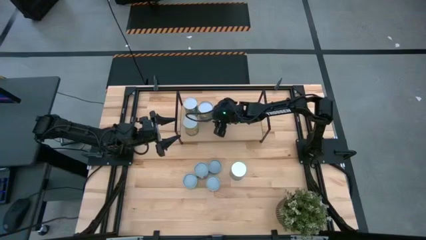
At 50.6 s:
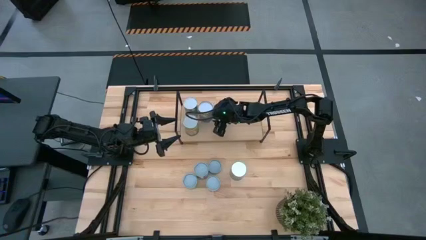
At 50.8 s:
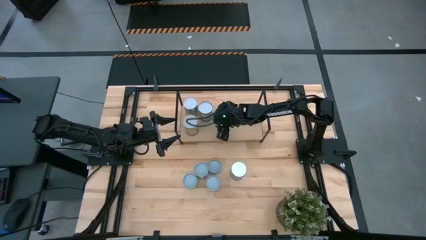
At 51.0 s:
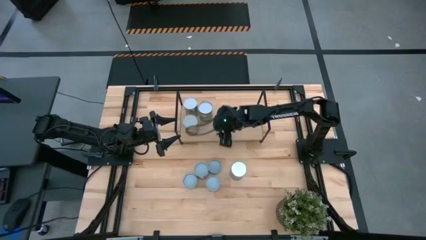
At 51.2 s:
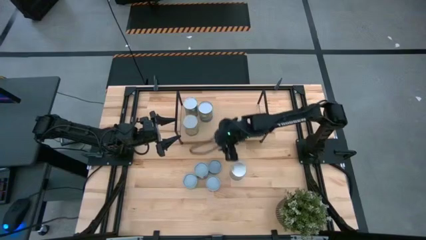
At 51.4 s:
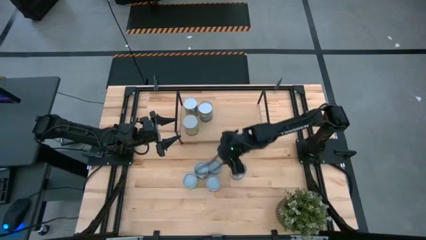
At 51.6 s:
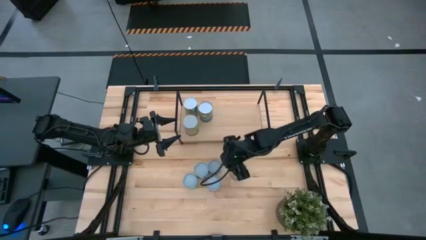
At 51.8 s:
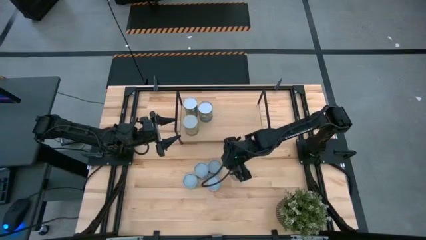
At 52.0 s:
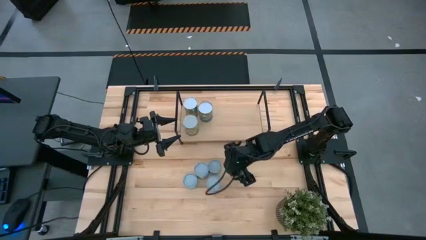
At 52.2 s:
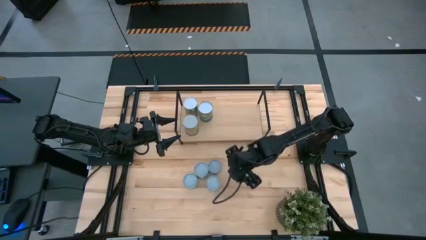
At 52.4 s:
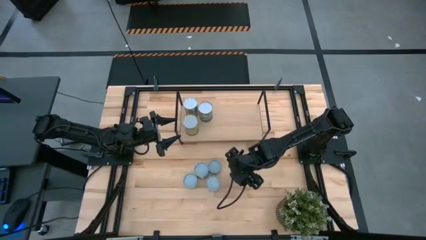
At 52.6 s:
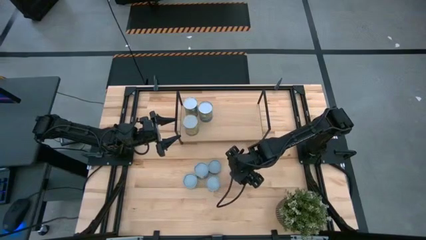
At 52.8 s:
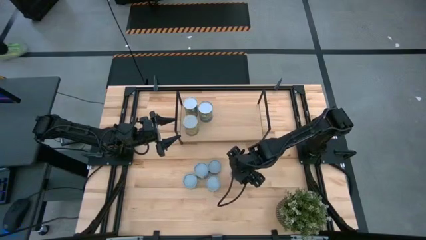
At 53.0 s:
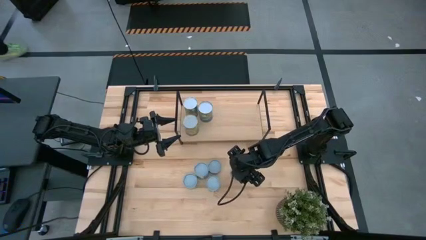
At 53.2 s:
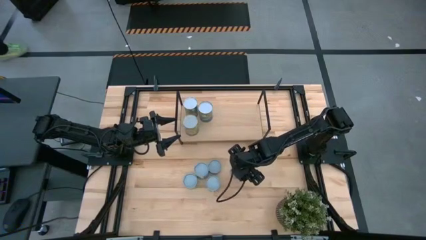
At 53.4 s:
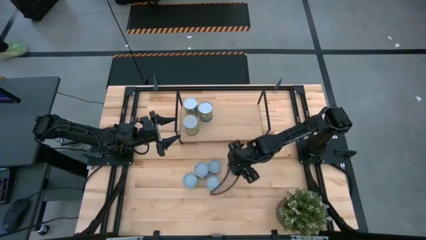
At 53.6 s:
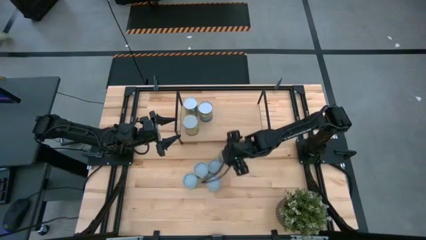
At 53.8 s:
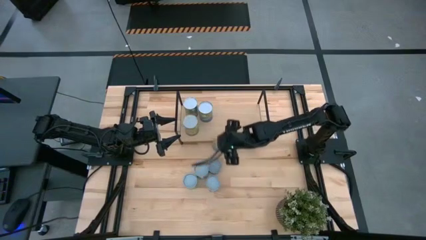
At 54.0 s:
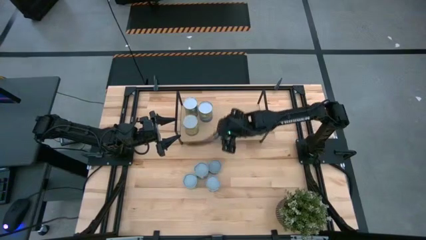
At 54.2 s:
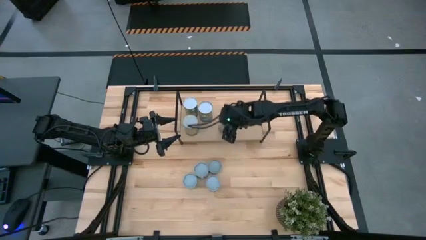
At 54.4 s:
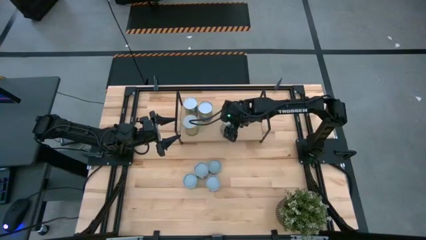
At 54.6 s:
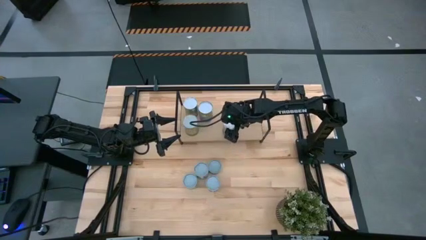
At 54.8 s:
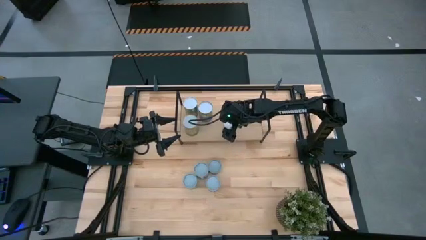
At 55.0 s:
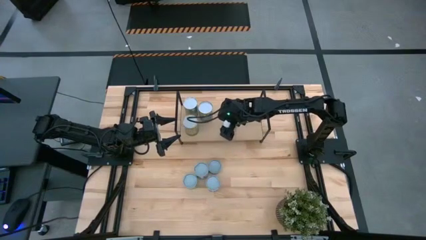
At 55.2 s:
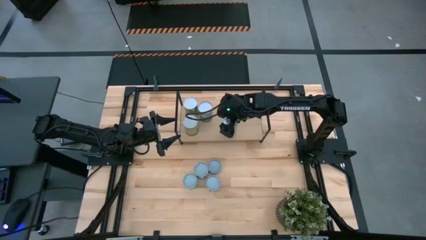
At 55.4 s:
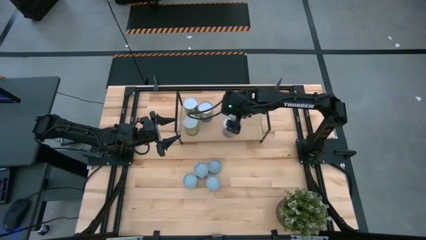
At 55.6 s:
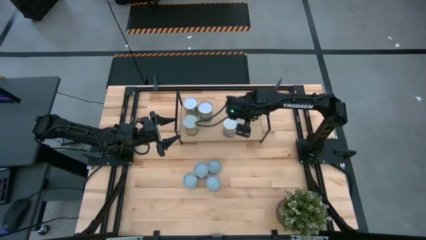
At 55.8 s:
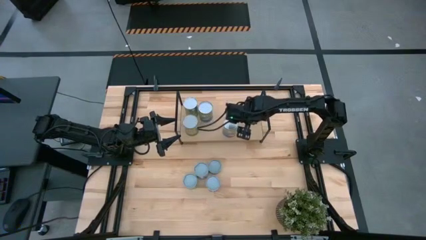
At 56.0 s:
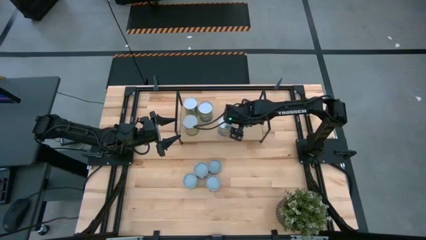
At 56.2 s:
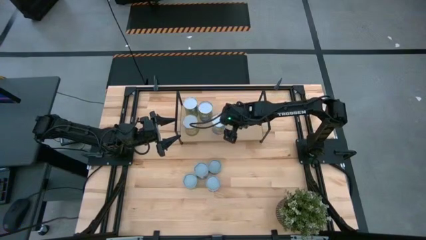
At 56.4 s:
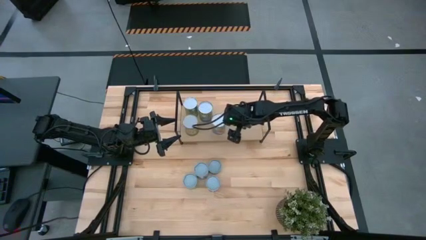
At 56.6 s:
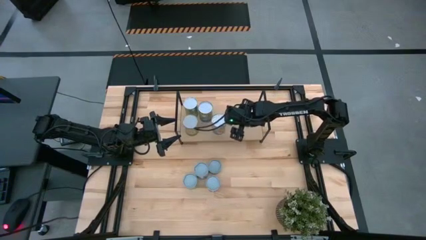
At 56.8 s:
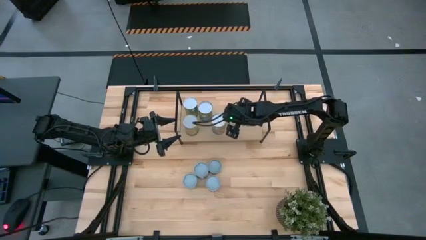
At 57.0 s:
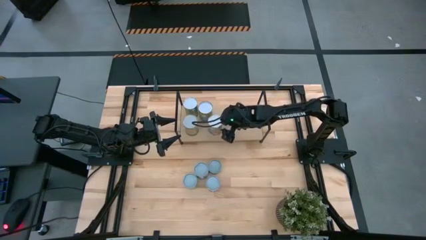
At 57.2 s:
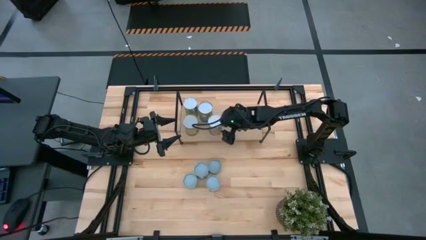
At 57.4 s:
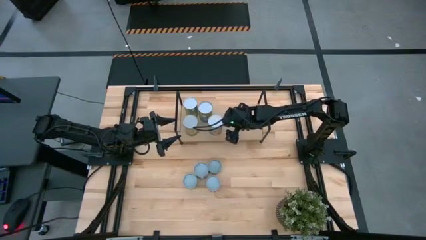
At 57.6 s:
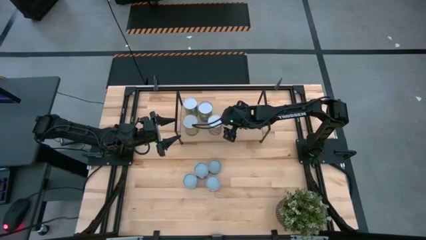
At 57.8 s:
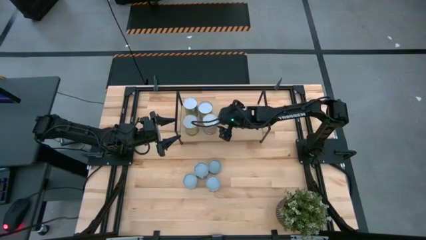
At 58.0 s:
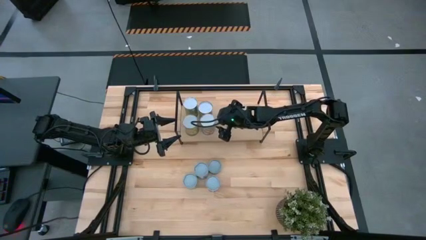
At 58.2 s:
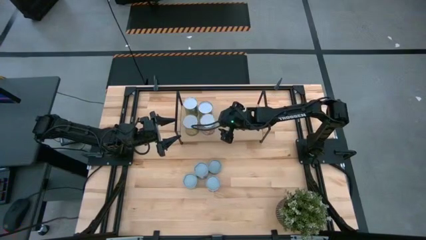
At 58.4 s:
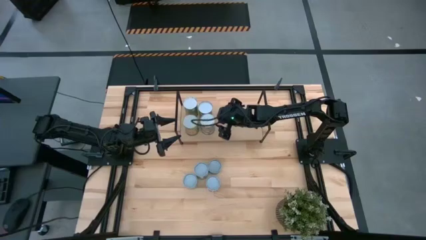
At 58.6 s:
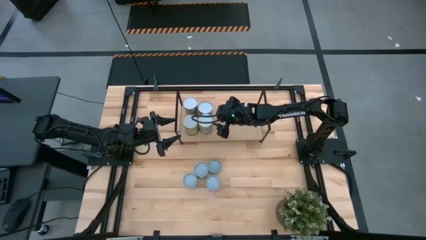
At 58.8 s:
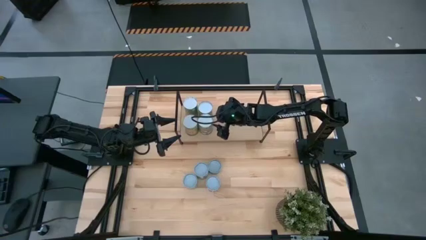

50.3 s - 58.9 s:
Task: Pick and place cans onto a shelf
Put the canned peaches on the shelf

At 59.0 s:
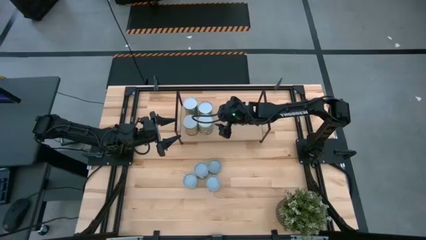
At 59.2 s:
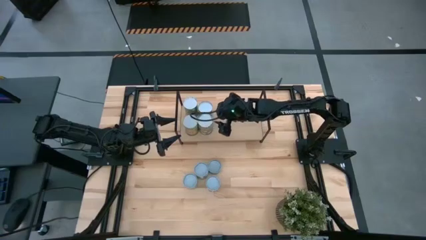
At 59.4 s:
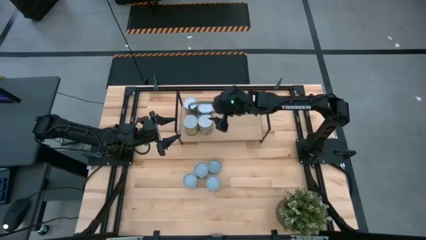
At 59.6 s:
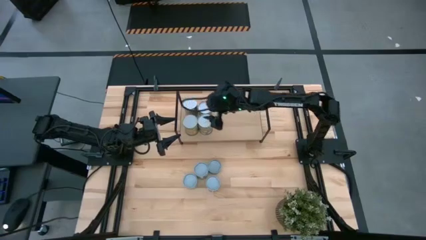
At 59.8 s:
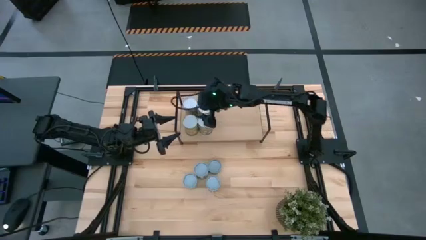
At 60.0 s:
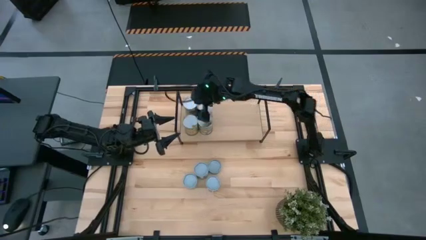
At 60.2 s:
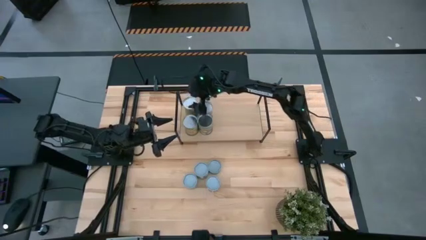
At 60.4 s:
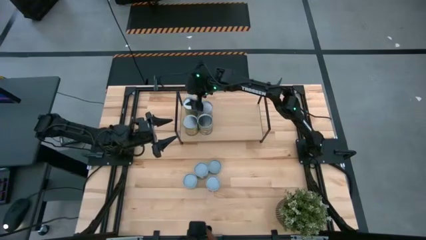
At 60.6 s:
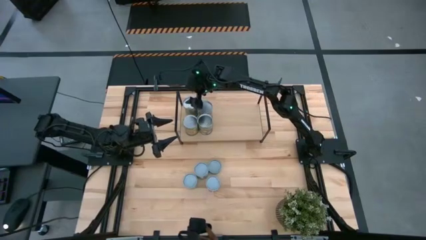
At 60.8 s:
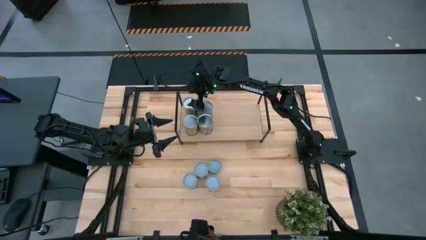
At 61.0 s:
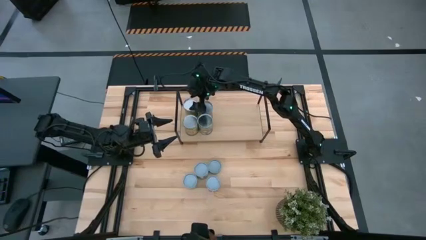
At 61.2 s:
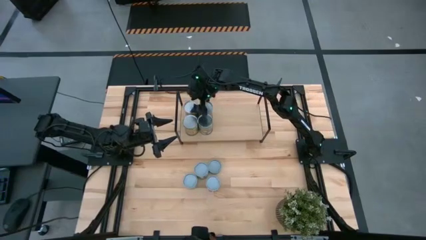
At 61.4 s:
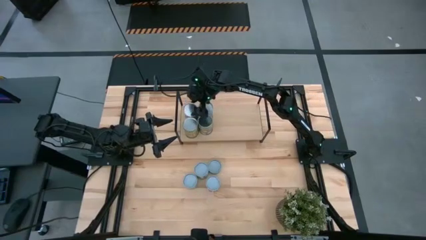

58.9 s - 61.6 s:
Adjust the canned carrots on the shelf

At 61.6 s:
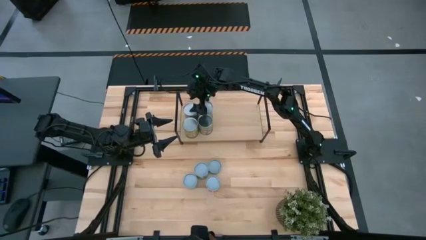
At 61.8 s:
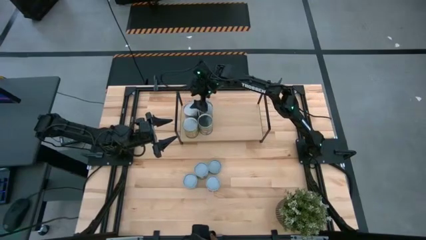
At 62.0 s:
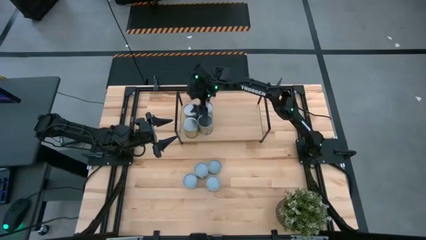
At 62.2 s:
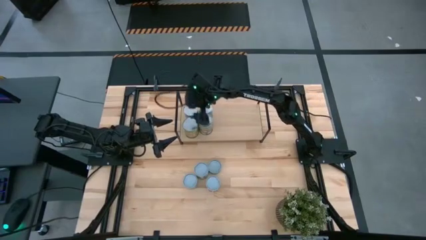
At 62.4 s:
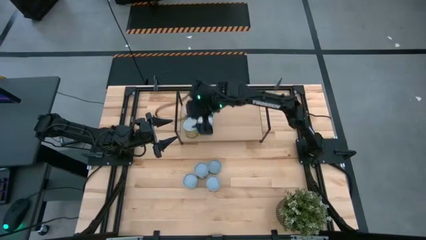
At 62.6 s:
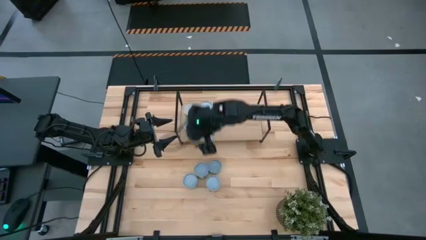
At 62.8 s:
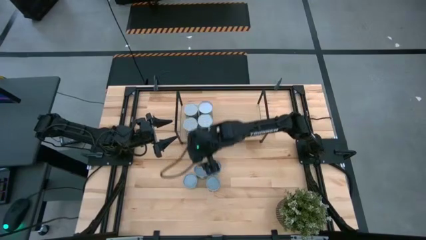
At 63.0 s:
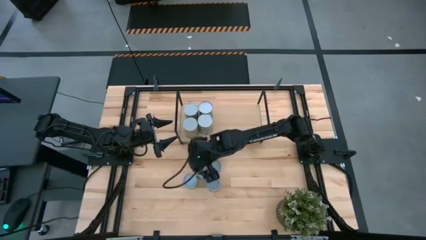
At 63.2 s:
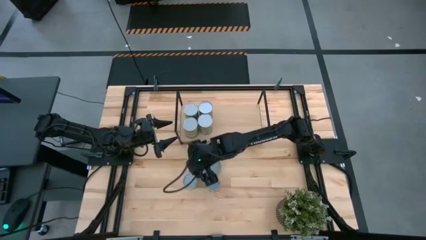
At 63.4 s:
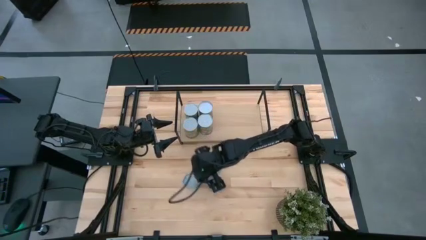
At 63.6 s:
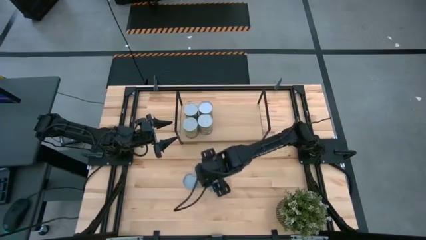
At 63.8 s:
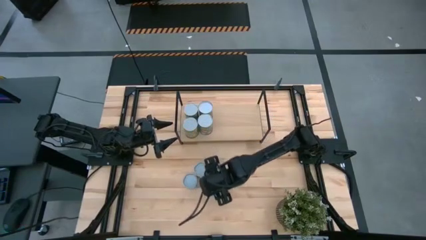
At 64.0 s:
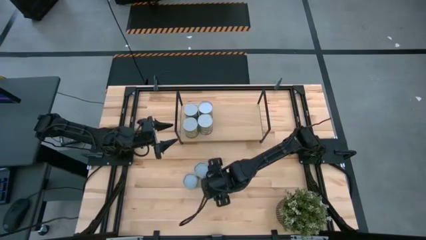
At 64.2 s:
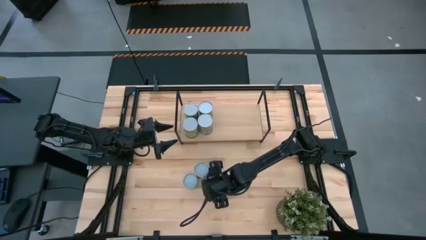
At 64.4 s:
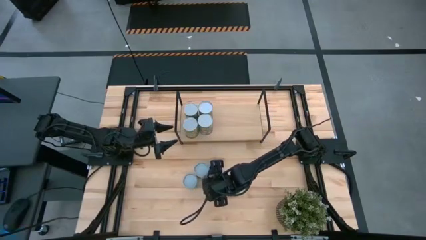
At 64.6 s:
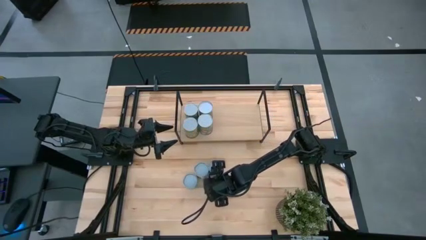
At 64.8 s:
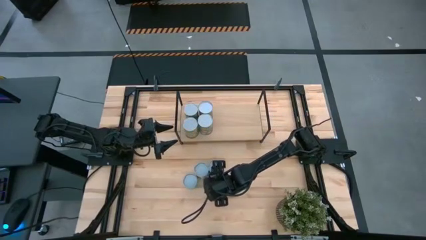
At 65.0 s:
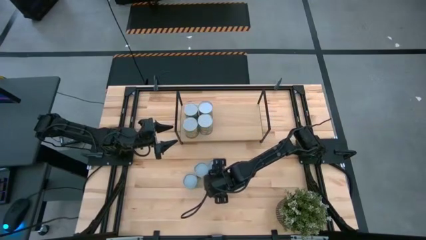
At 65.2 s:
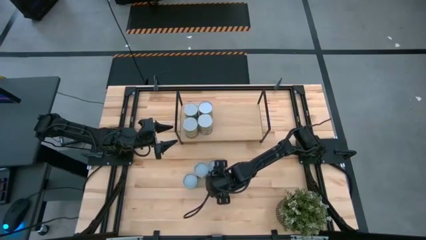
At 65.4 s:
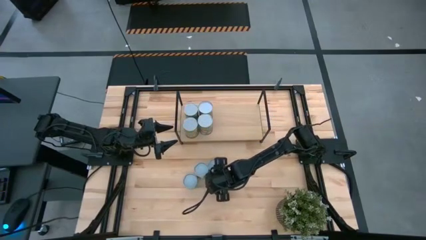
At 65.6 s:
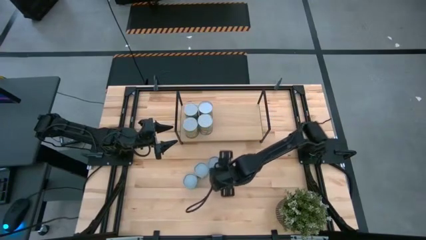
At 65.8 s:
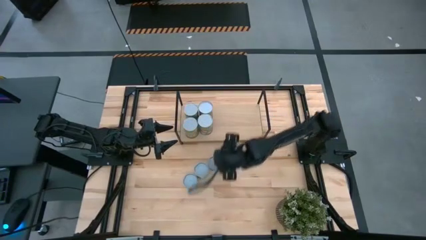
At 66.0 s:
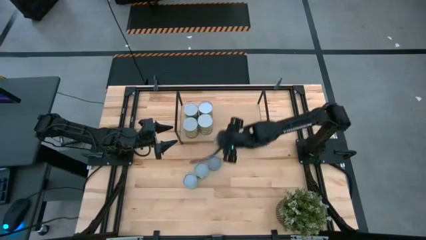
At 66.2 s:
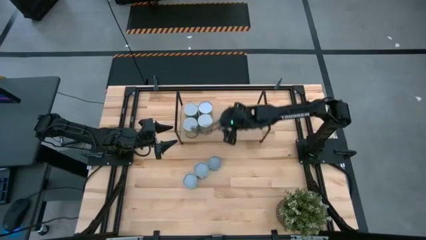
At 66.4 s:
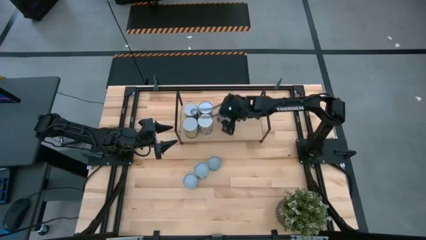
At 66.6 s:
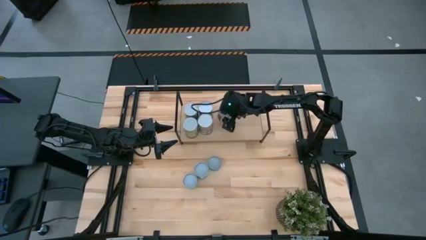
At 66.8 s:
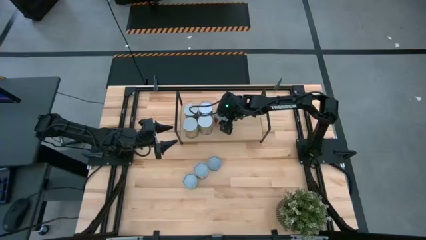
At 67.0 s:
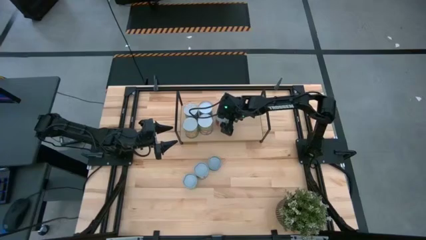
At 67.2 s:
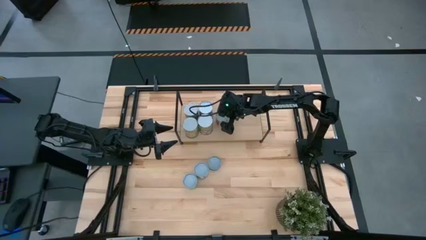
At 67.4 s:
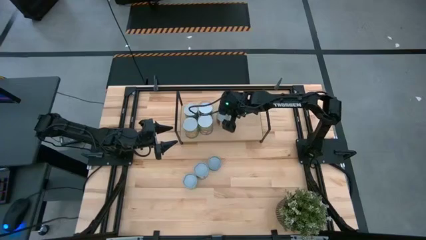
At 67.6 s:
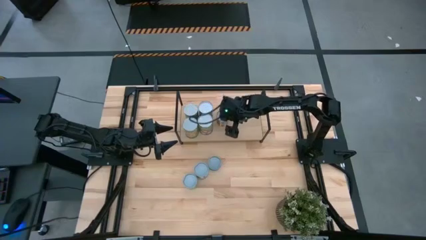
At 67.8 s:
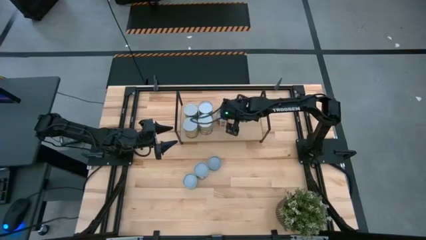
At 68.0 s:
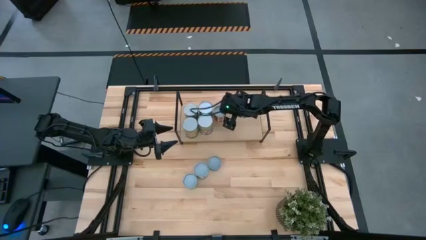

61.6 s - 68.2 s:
Put the canned tomato on the shelf
